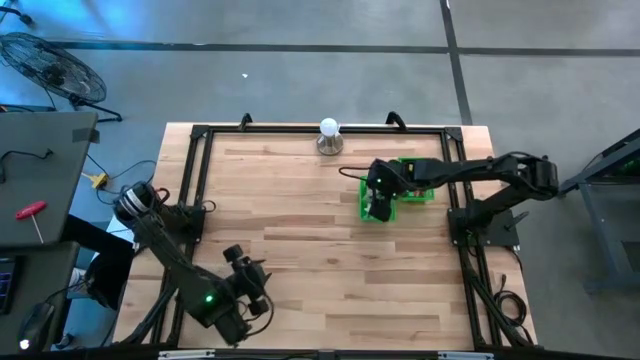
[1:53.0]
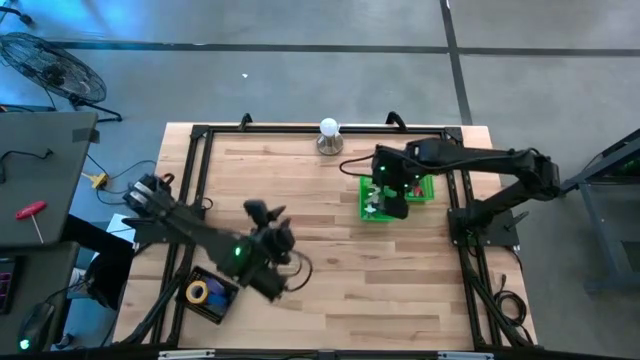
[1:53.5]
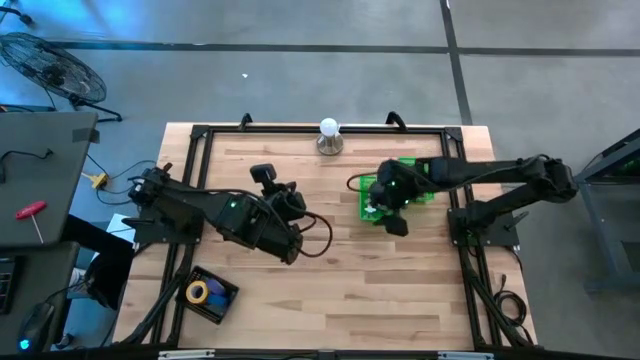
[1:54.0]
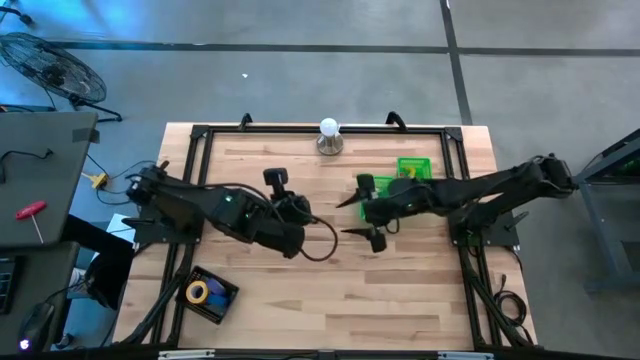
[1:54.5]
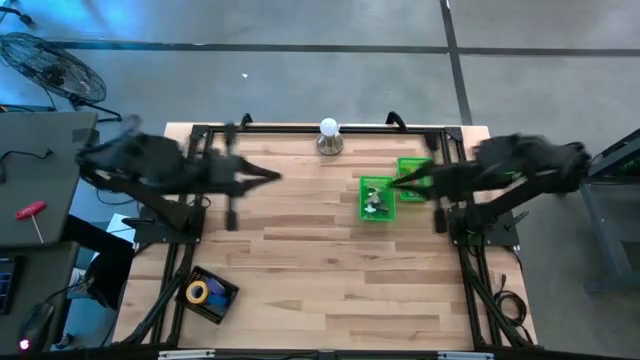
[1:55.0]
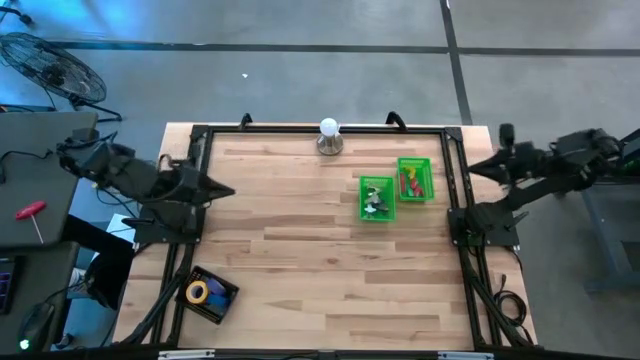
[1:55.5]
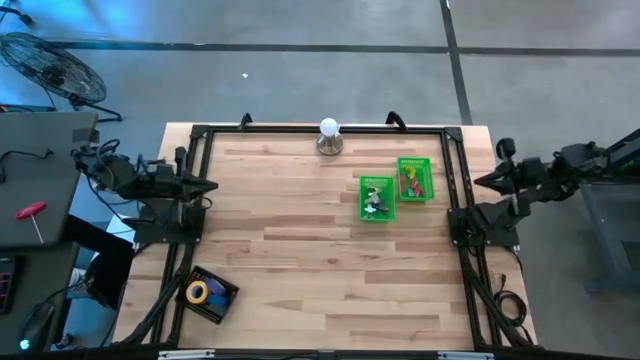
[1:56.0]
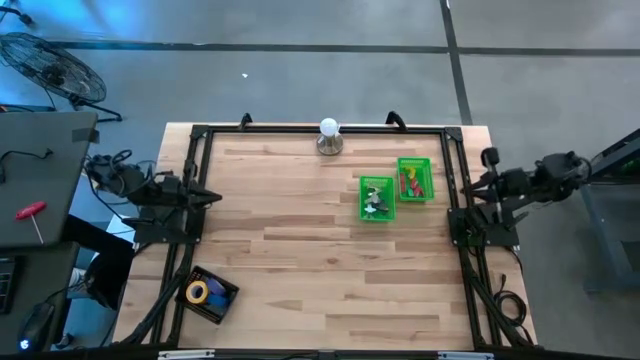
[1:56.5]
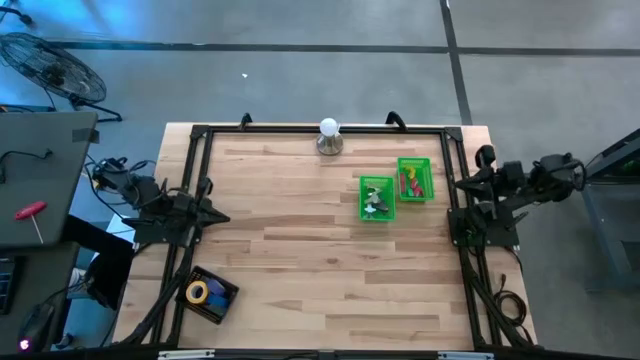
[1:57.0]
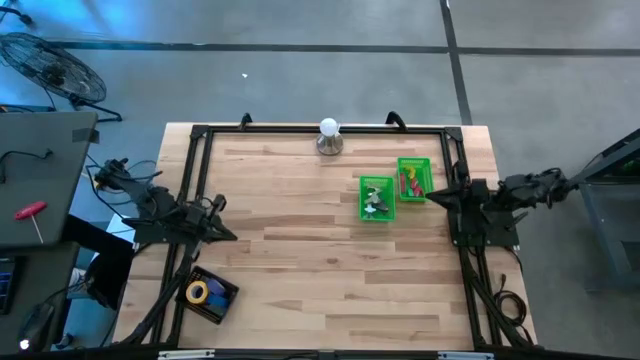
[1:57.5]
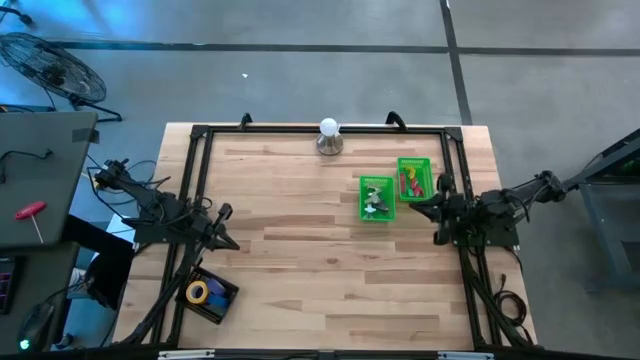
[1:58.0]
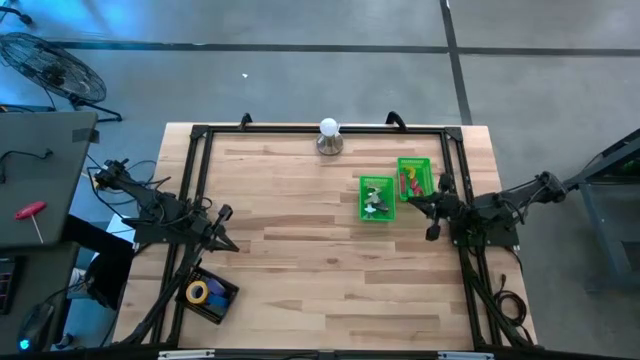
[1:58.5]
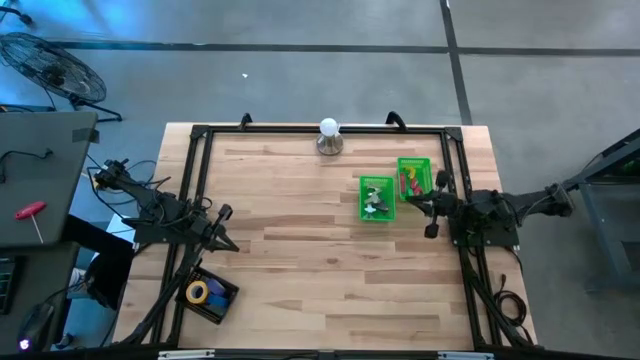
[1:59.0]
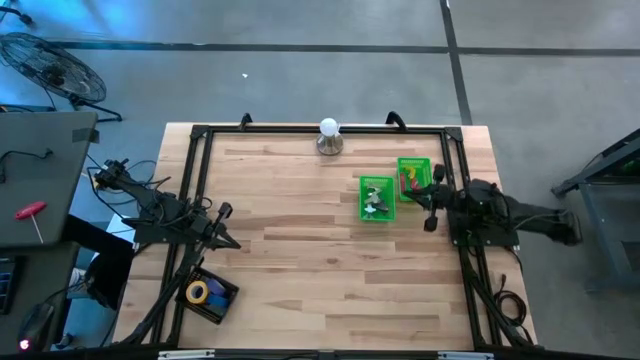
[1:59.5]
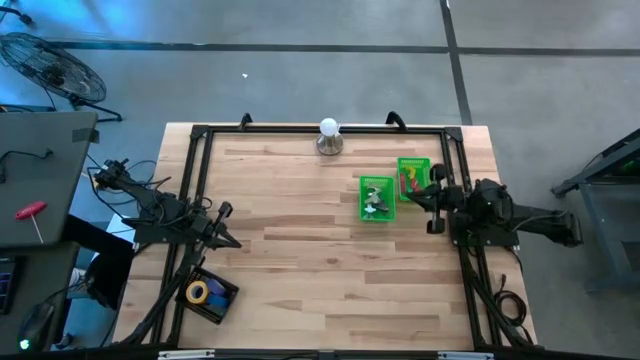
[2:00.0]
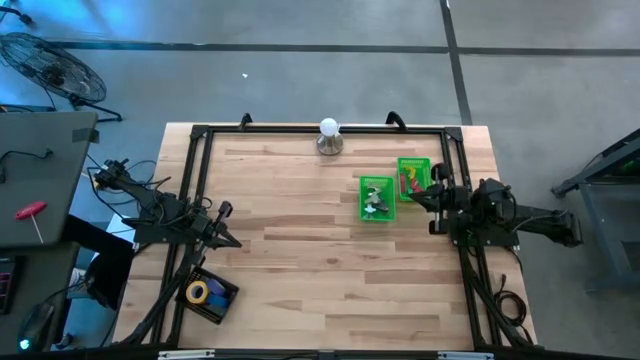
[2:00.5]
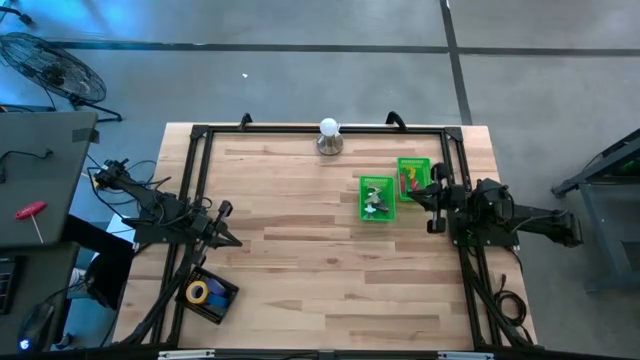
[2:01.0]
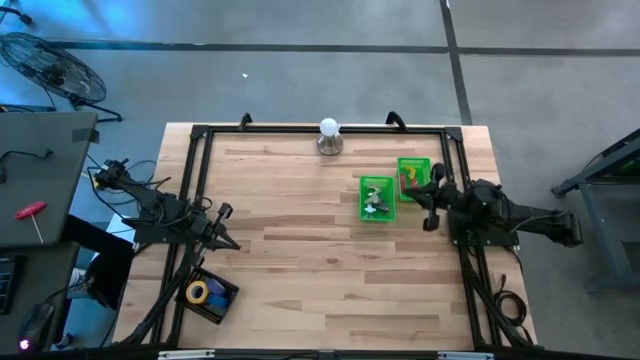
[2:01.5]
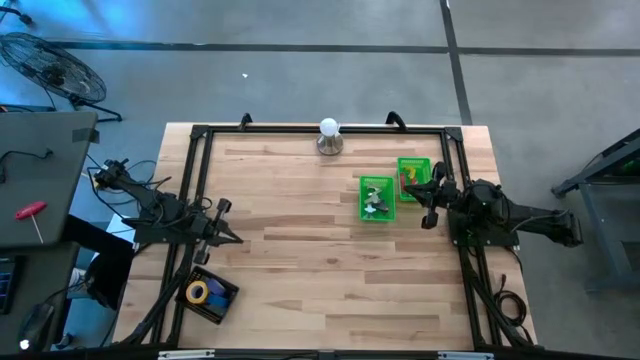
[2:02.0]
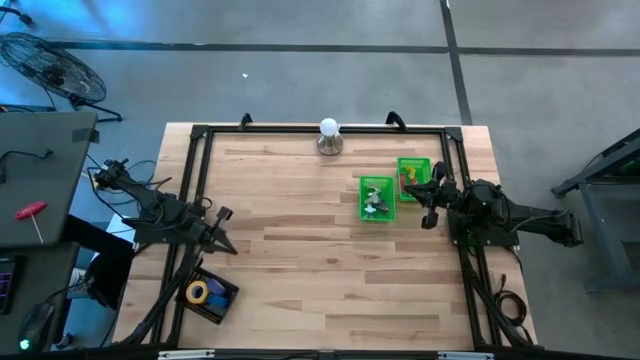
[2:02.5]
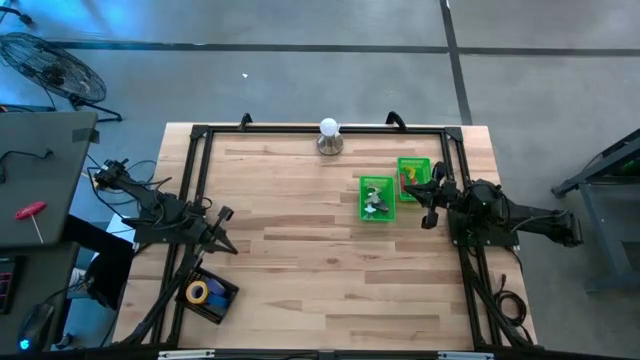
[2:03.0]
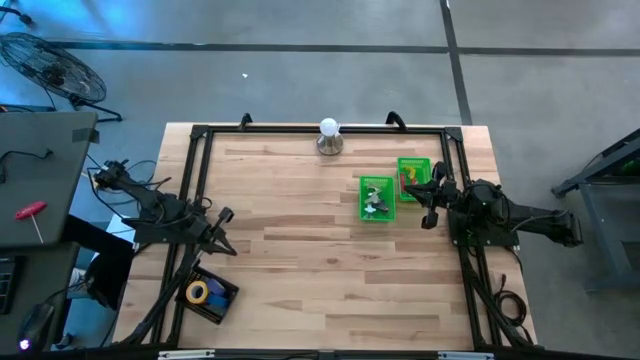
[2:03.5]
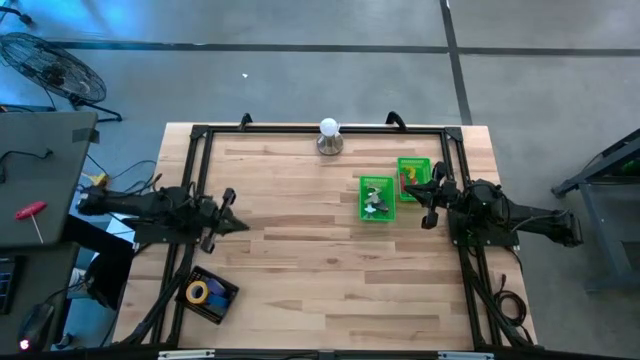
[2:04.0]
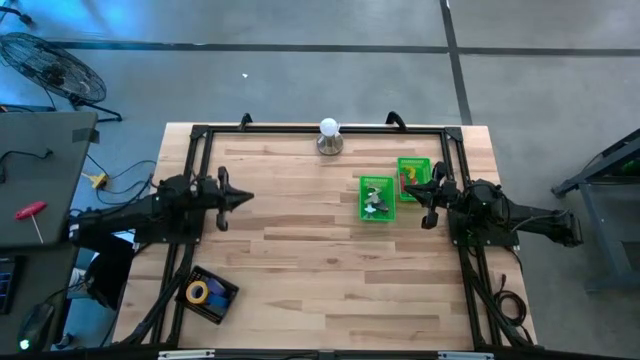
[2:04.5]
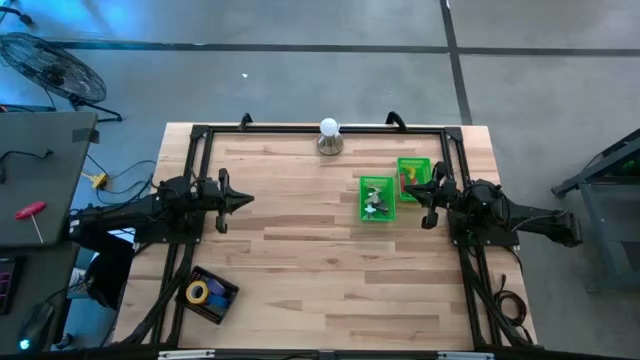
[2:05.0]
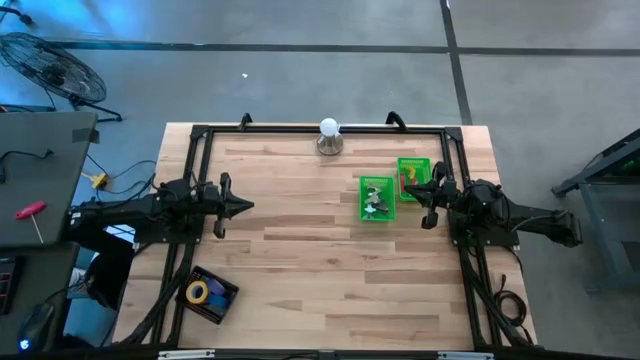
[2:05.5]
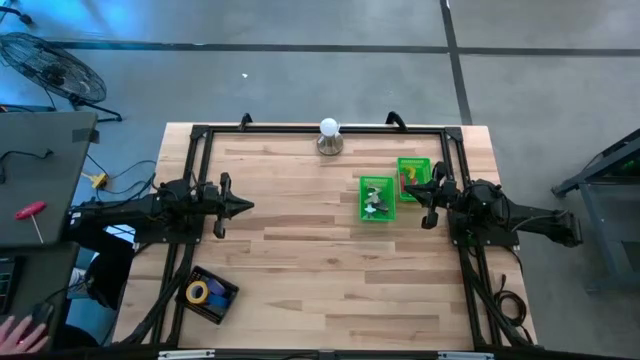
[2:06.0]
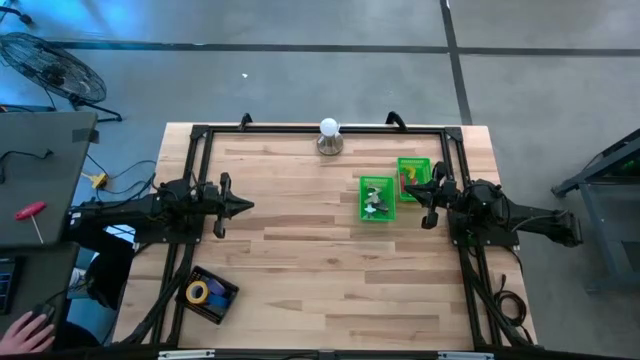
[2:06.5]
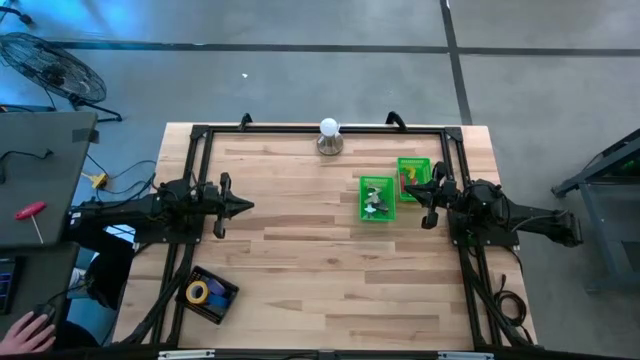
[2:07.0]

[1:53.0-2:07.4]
Task: Pick and place Stapler, Stapler remover, tape
Return to Home Position

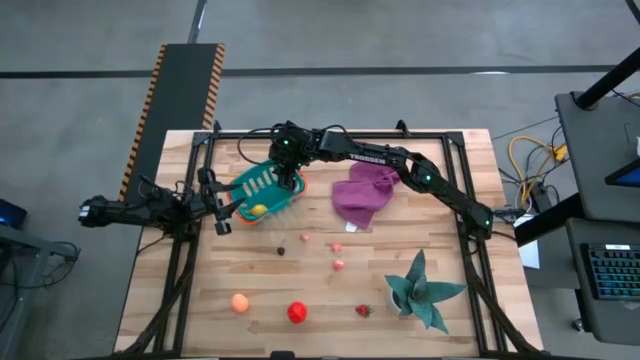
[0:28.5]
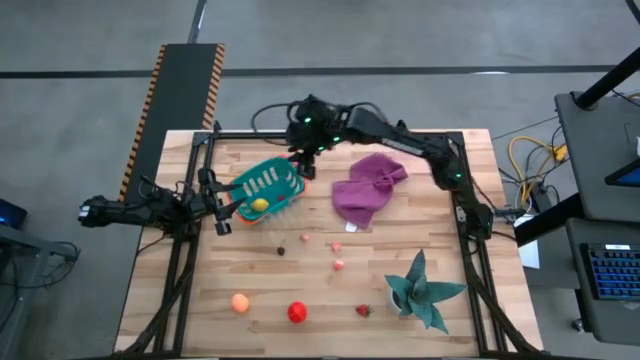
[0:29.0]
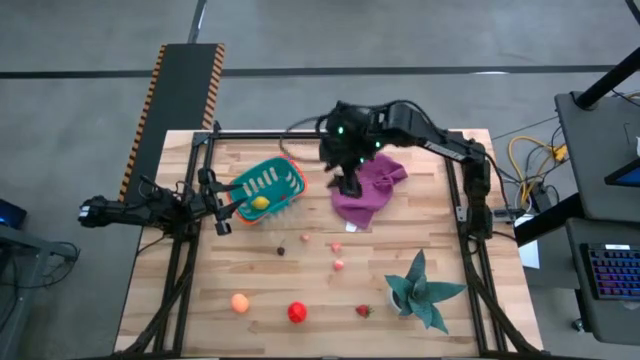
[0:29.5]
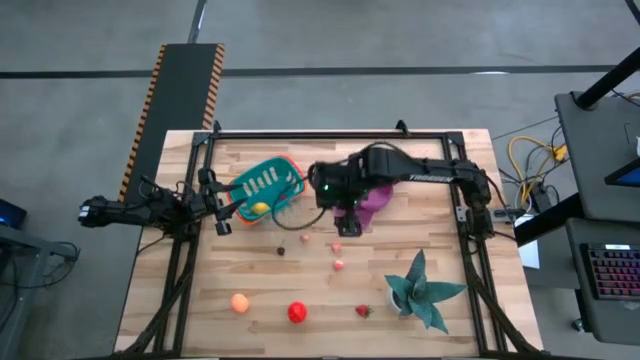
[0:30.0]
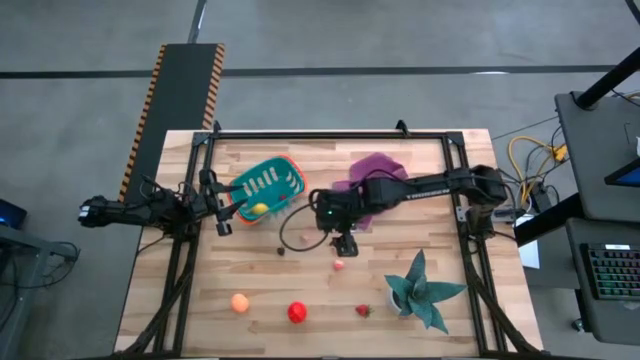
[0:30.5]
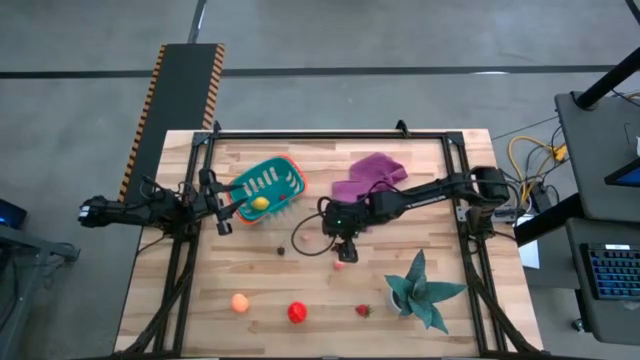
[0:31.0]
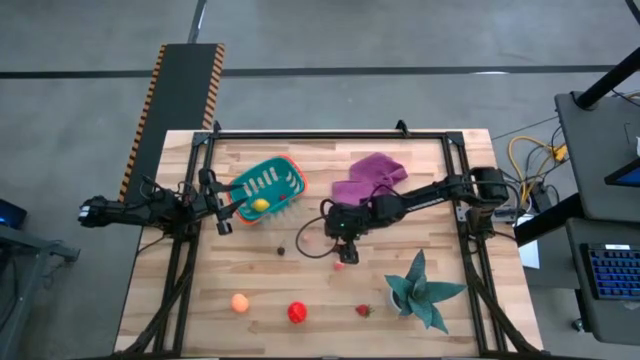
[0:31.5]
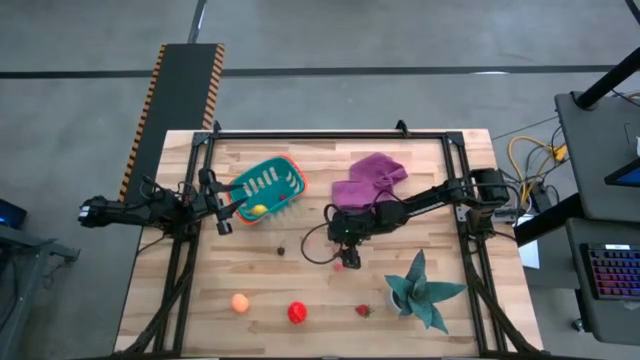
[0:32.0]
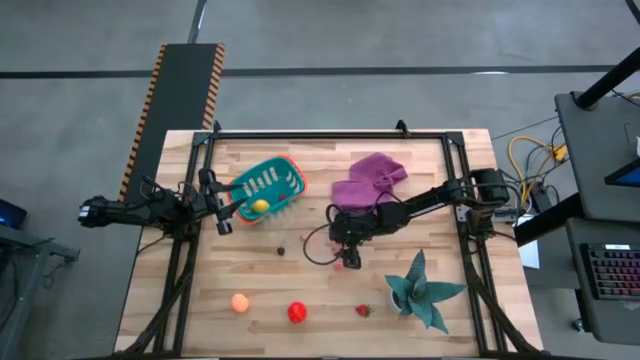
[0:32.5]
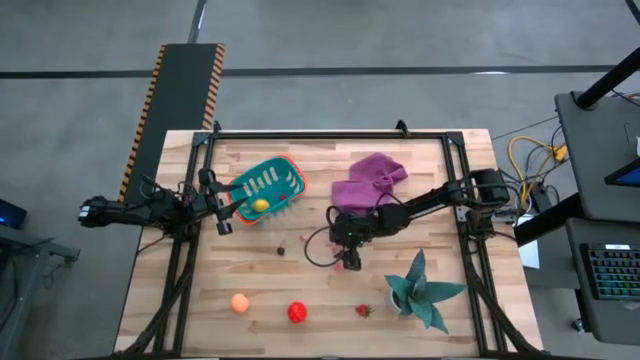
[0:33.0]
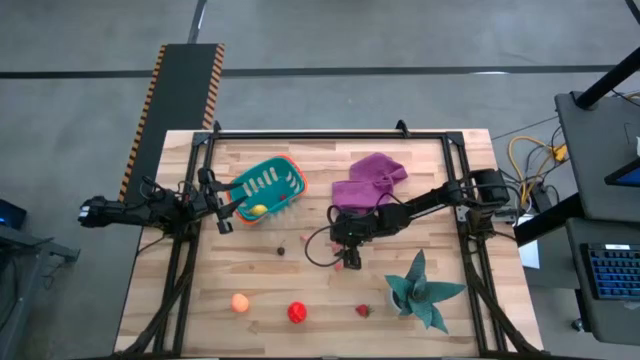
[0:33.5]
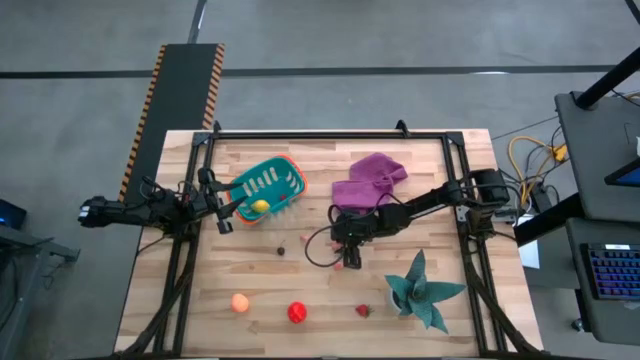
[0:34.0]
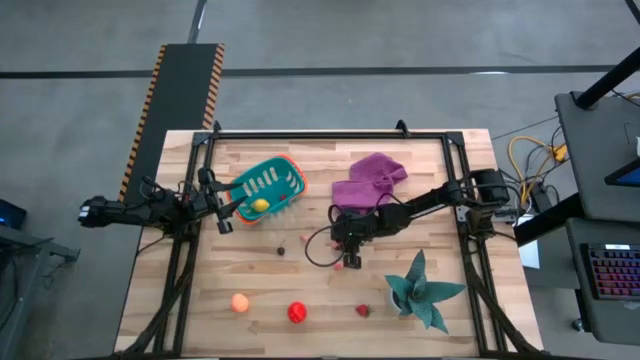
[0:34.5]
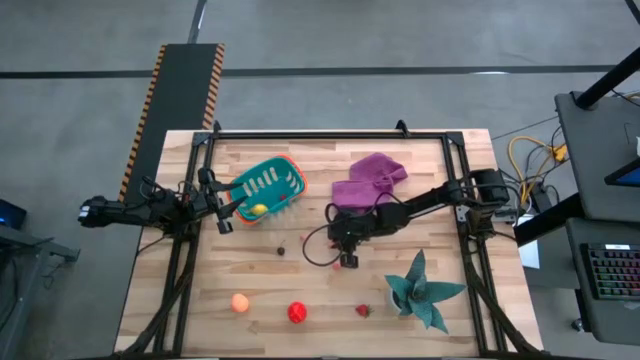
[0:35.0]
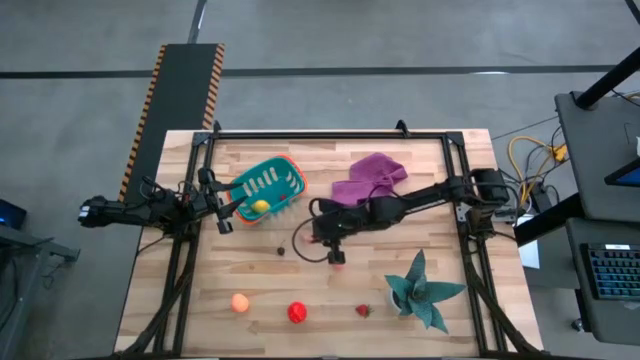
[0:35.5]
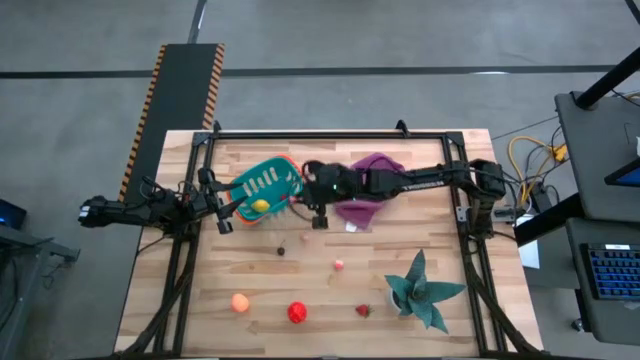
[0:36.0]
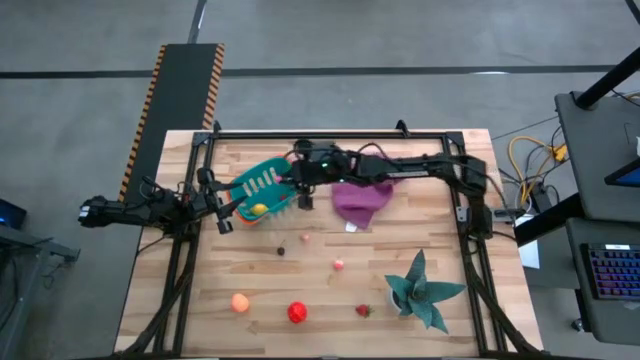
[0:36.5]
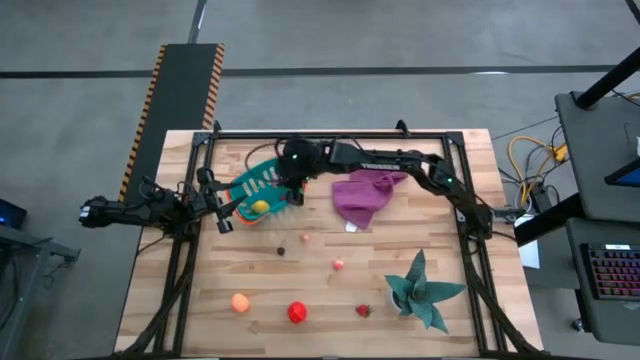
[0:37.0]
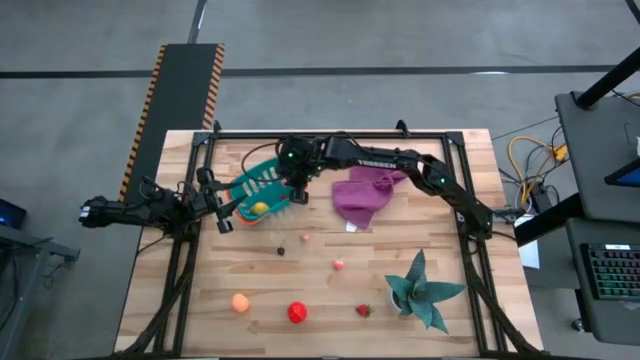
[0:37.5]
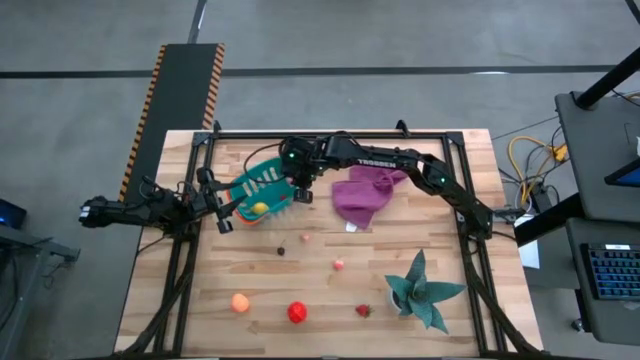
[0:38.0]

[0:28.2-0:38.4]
Task: Pick and placing Produce into tupperware
Put the pink peach into the blue basket
